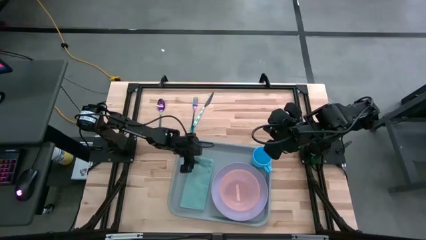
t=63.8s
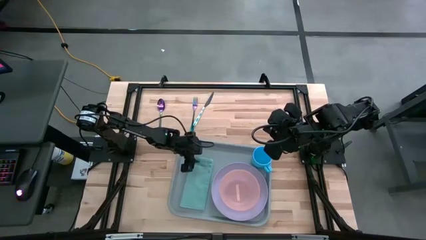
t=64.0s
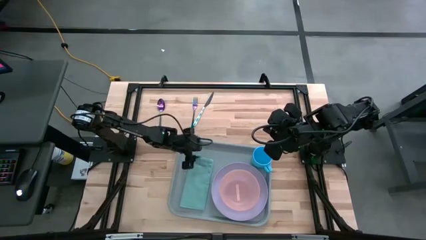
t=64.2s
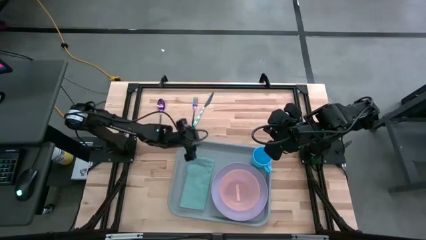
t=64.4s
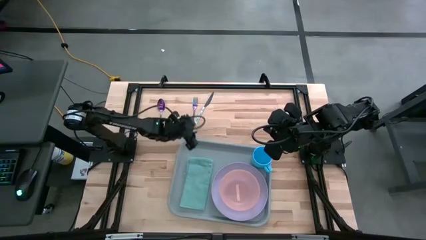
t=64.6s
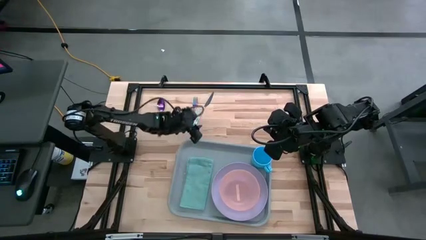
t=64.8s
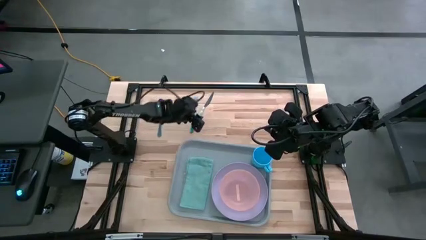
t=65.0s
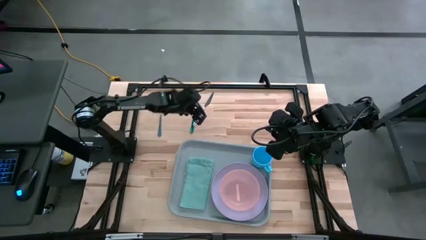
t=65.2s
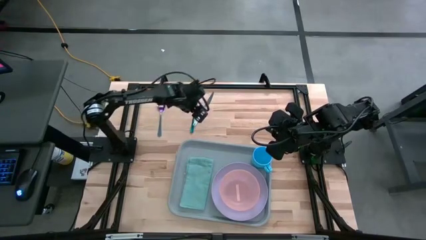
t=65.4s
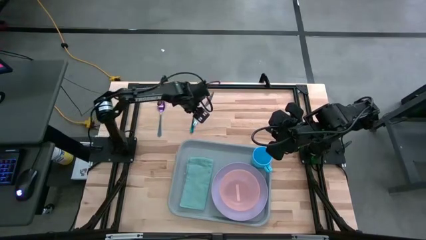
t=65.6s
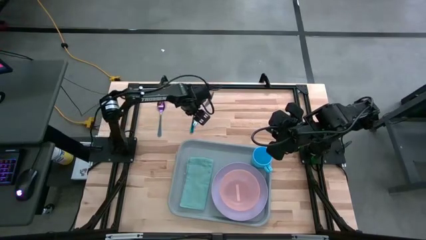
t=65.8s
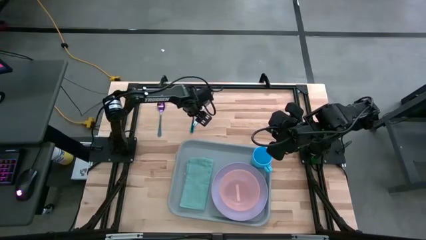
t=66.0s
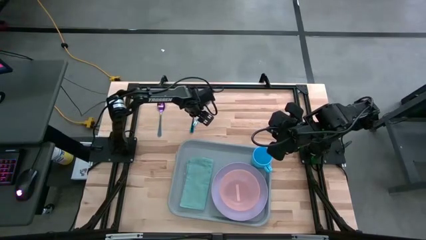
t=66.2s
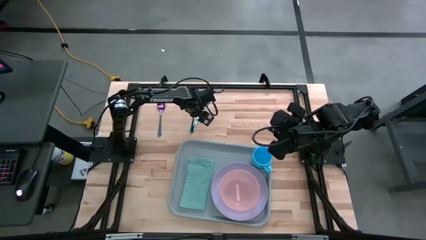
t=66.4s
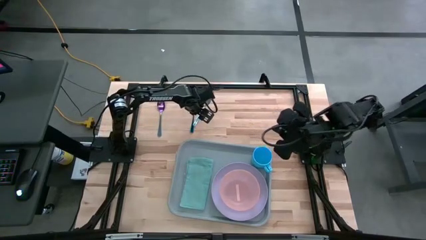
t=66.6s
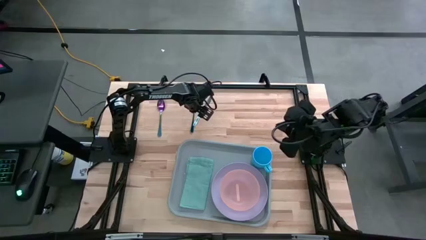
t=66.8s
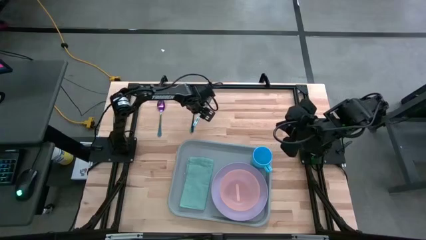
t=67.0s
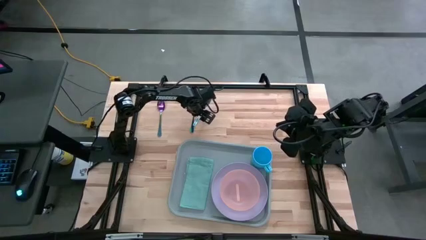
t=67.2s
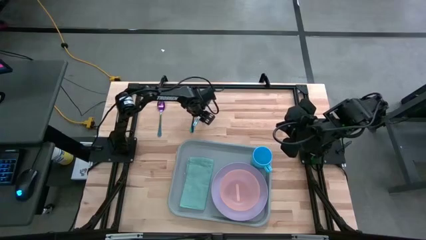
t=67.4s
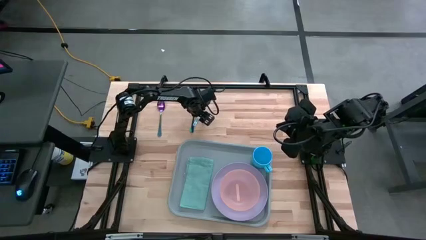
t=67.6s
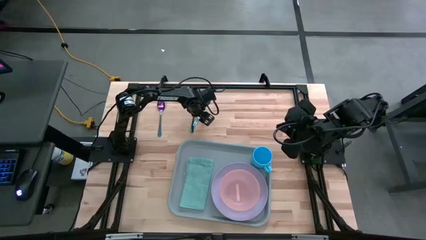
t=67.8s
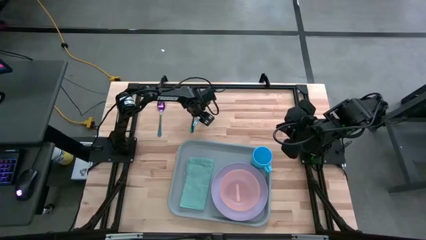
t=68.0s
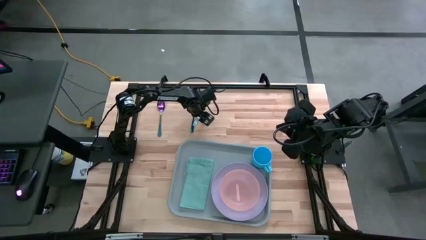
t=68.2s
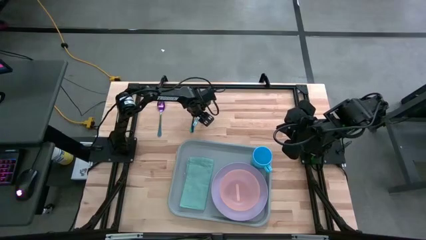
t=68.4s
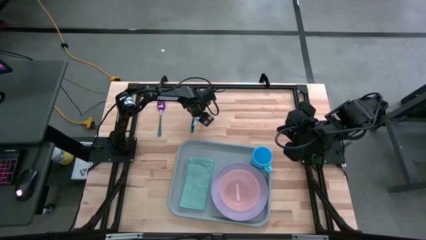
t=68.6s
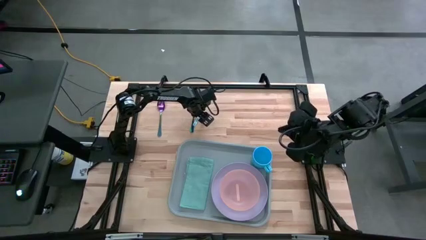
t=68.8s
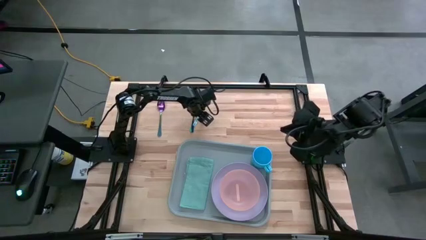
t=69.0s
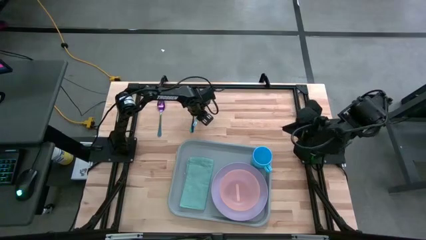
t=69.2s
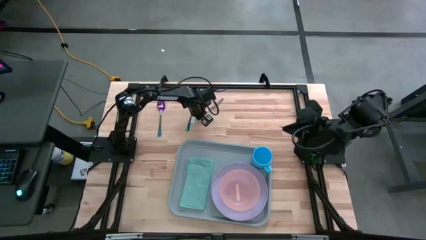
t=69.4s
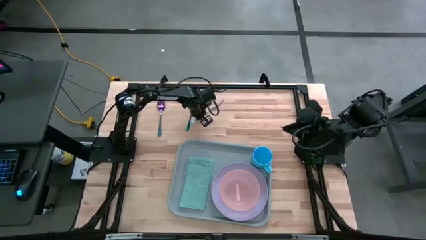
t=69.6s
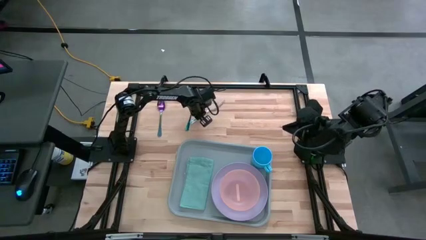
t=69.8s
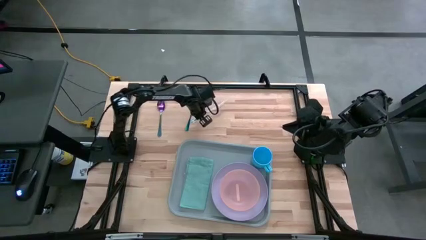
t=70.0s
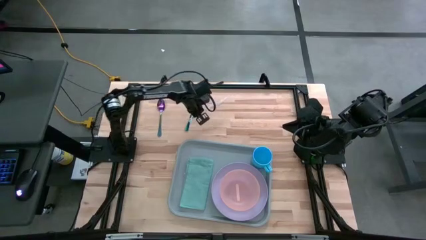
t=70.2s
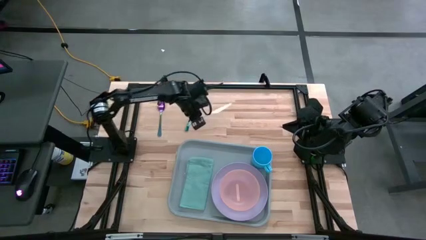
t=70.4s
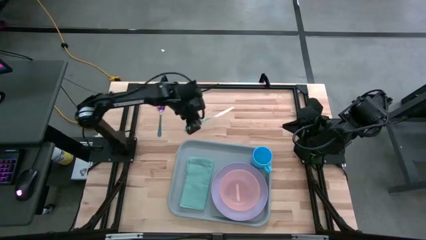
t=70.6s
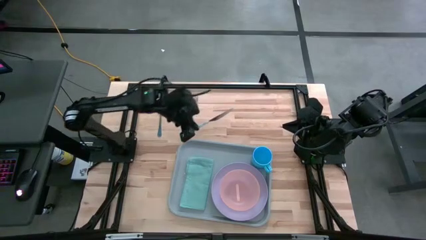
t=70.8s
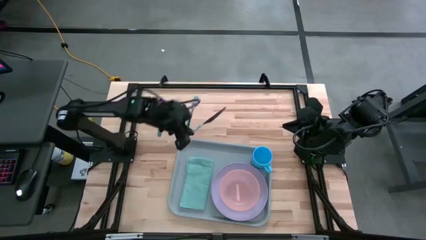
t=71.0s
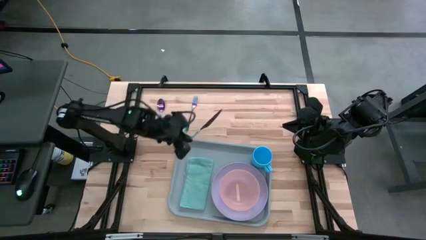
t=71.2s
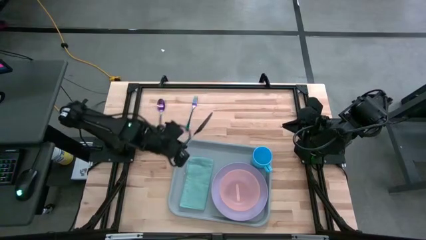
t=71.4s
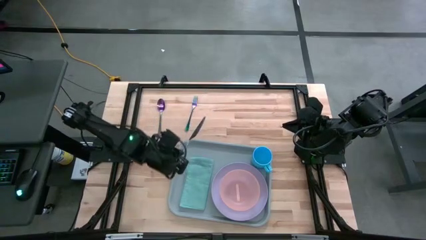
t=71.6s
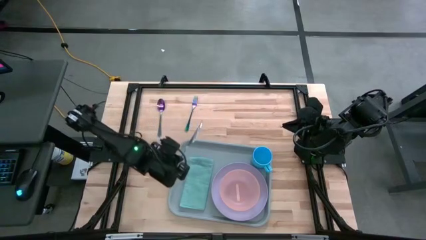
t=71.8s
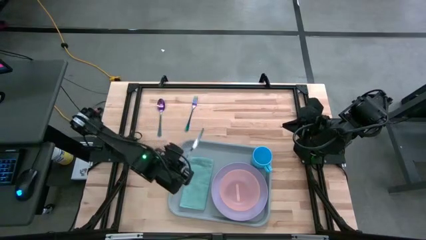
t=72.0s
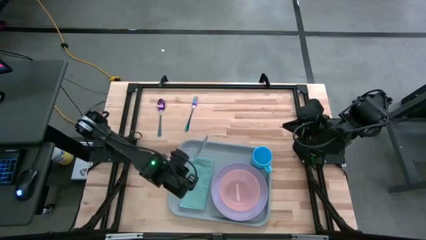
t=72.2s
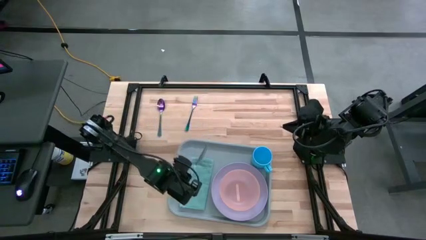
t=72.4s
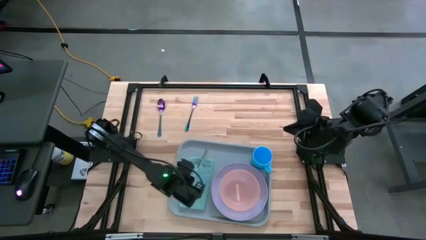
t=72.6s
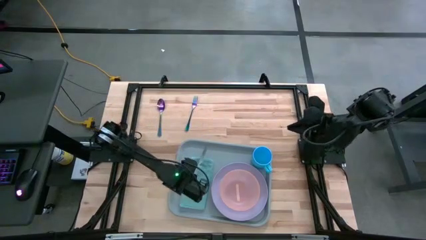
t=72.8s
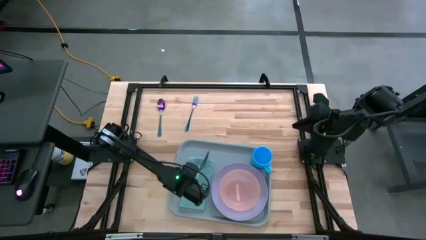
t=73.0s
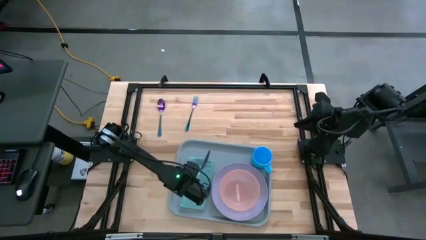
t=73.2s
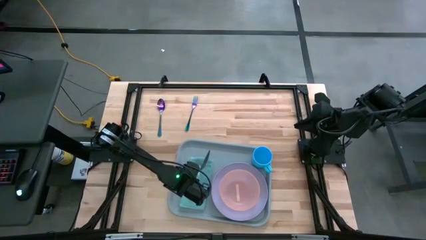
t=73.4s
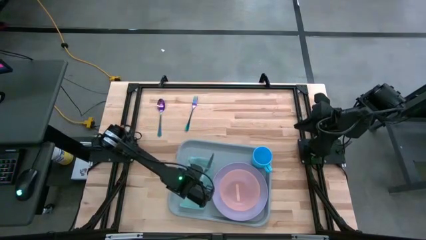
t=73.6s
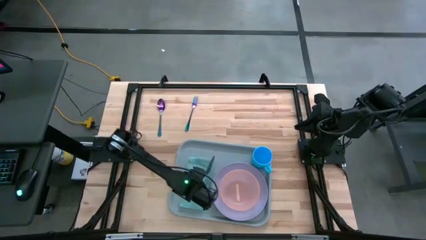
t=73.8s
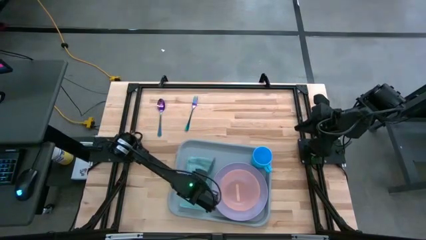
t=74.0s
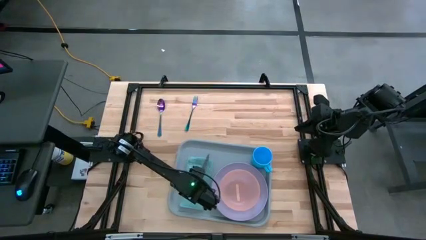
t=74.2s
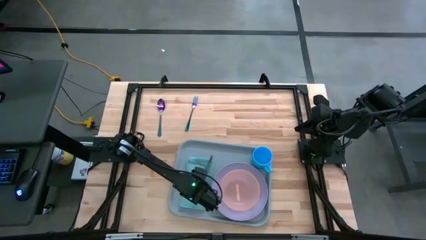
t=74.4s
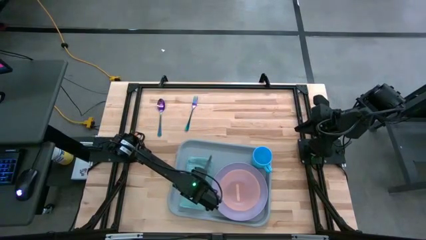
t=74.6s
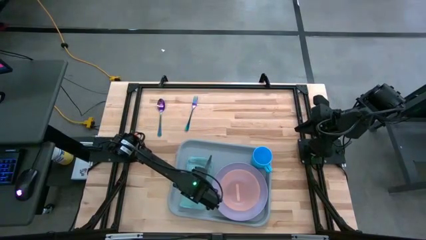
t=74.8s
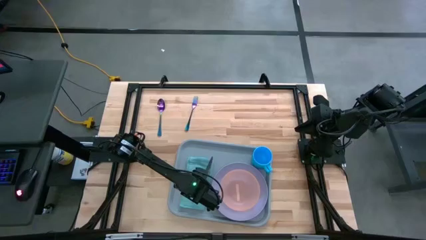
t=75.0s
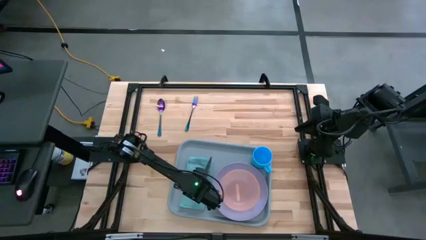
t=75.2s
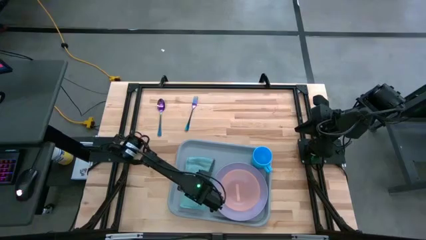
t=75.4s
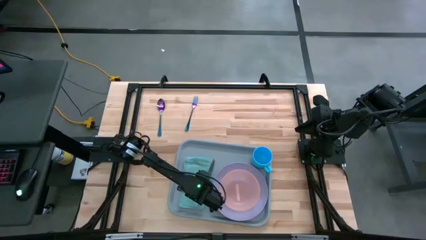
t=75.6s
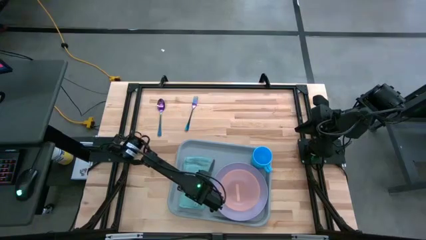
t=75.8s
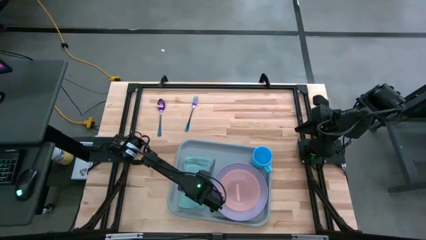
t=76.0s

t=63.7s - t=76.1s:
Task: Set up tray
Put the green knife on the blue napkin on the gray tray

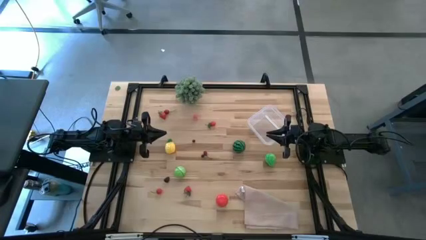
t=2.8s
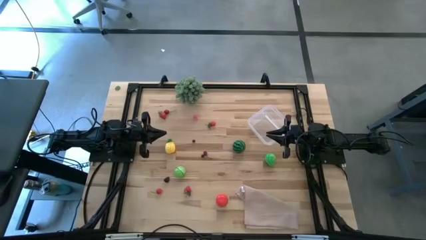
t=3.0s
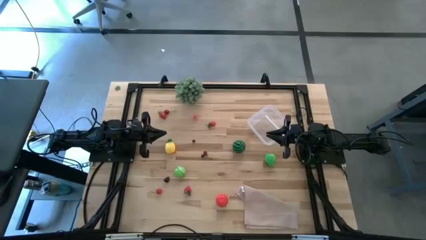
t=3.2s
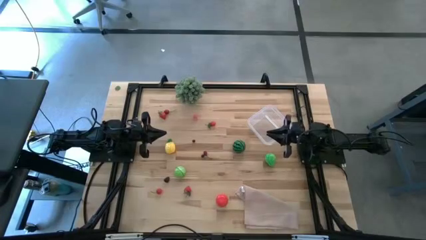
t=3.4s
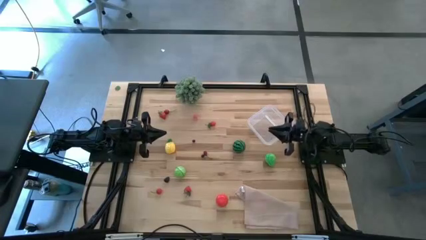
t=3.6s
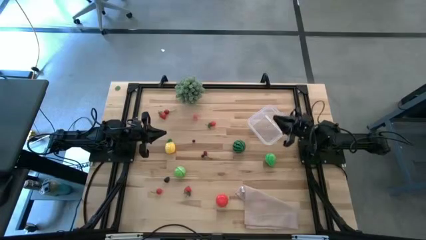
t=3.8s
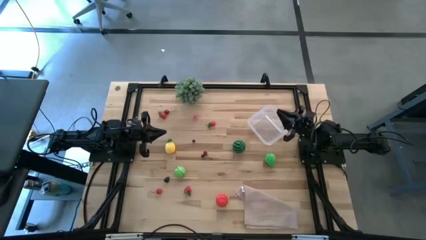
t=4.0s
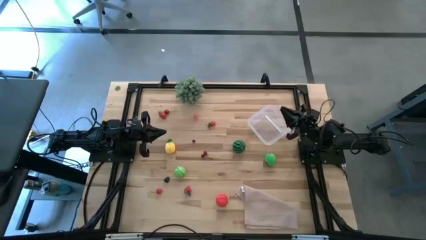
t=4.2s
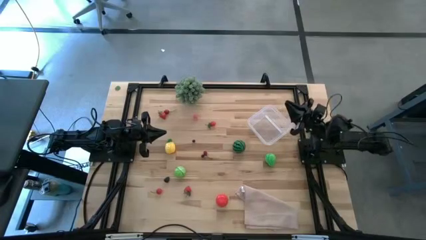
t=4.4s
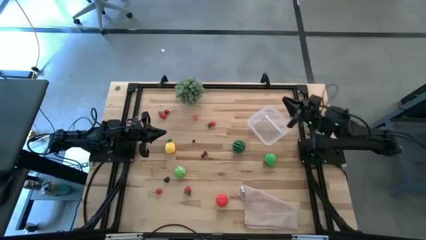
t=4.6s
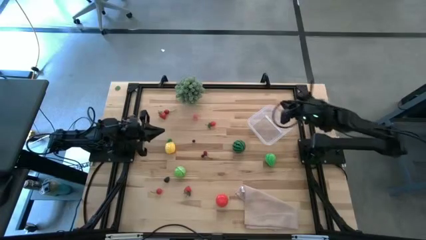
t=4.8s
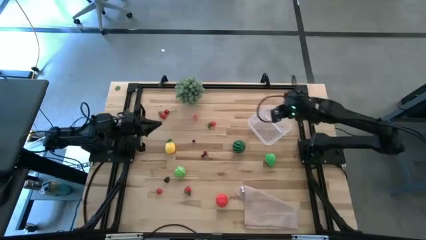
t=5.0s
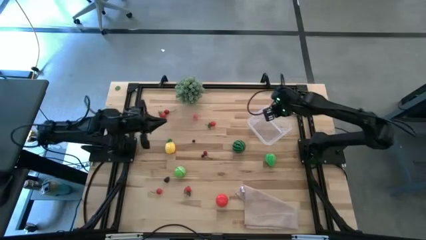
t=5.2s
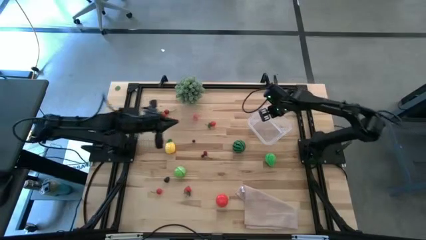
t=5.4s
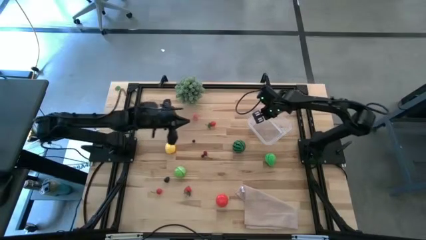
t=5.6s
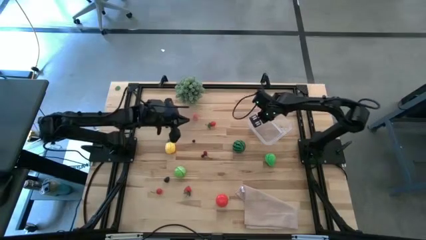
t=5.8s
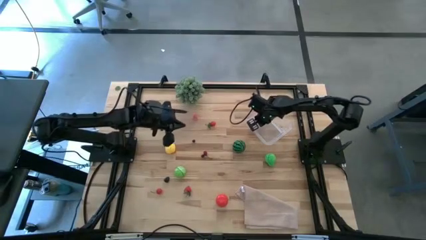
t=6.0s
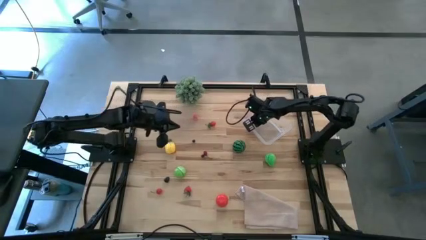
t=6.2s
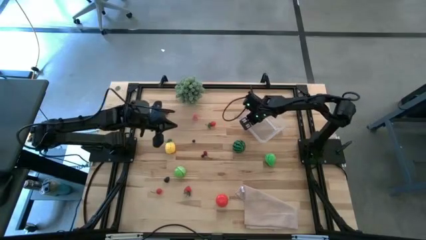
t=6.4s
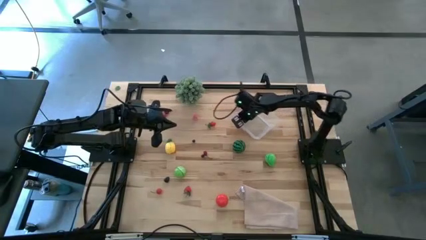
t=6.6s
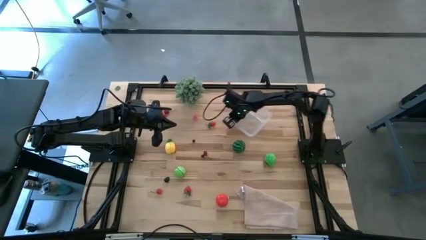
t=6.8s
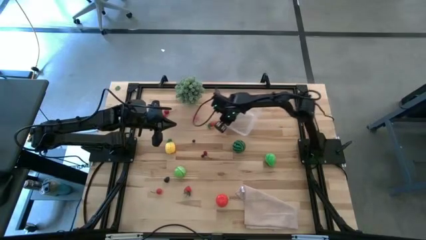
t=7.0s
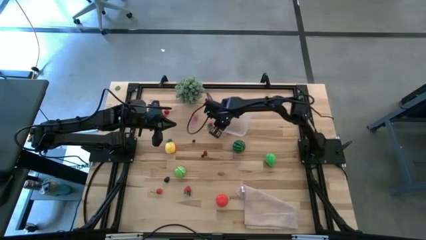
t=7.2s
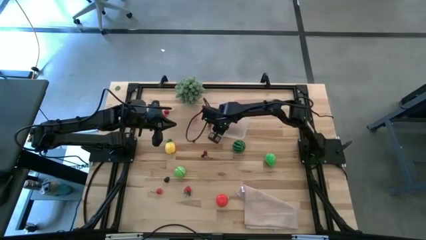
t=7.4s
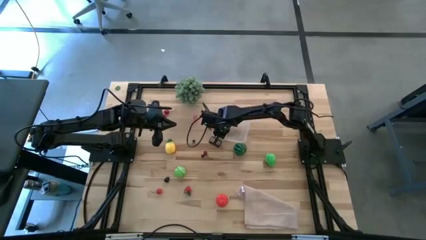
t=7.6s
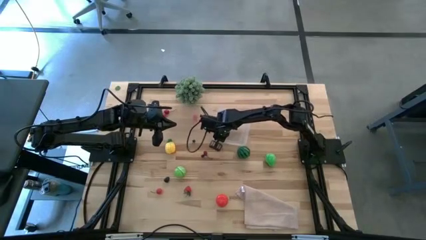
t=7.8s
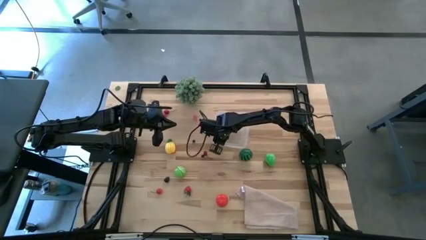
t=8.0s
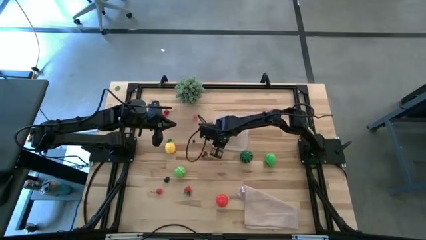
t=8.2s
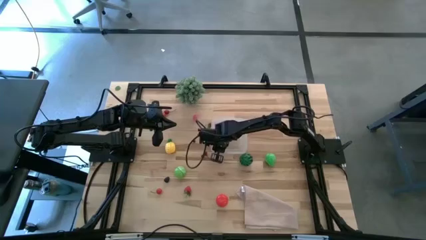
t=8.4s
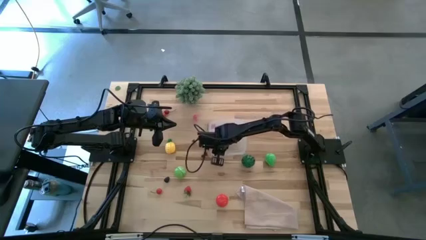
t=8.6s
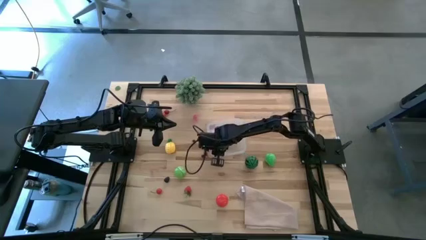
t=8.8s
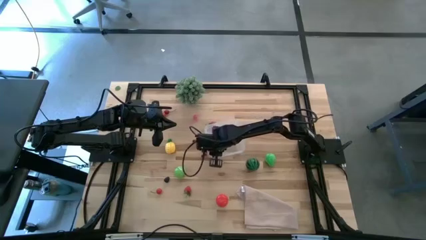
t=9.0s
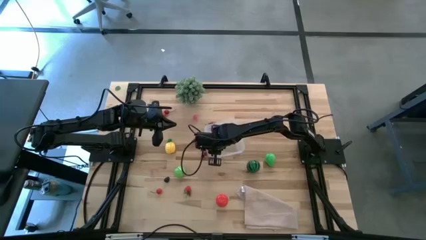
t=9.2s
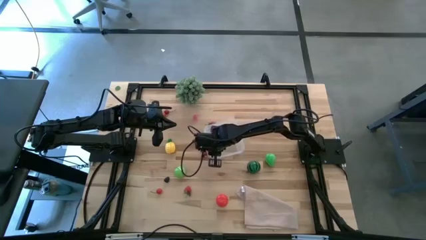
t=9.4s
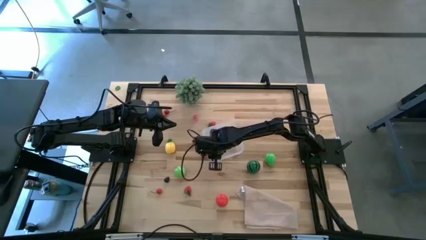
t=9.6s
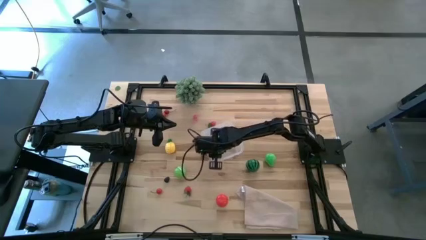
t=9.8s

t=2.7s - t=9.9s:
Task: Pick and placing Produce into tupperware
Move the transparent bin to the center of the table
